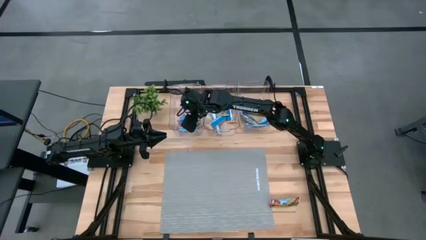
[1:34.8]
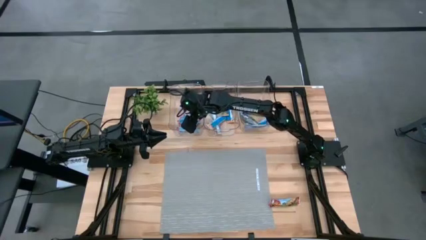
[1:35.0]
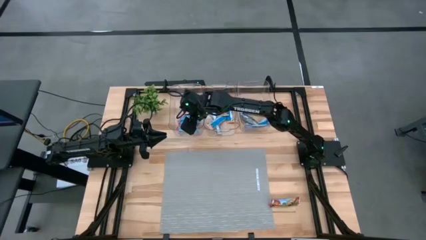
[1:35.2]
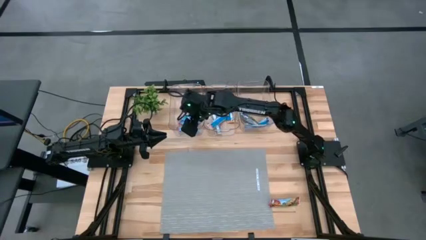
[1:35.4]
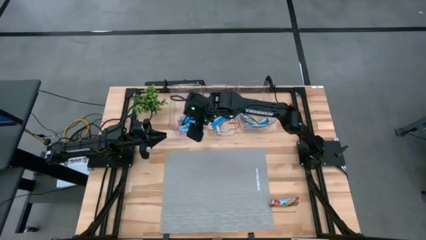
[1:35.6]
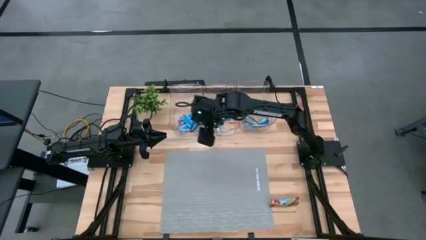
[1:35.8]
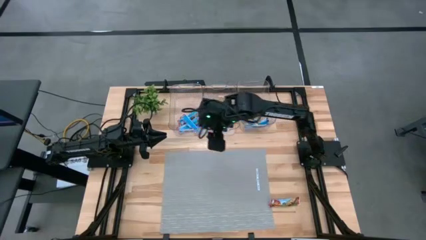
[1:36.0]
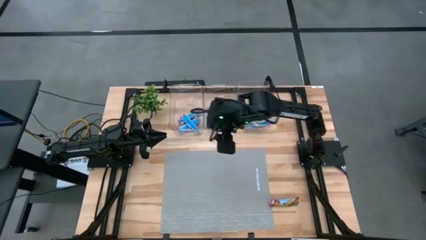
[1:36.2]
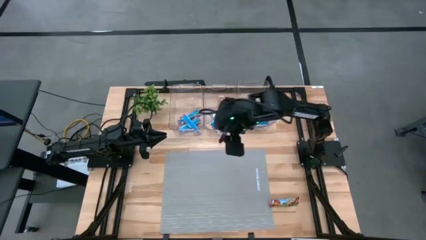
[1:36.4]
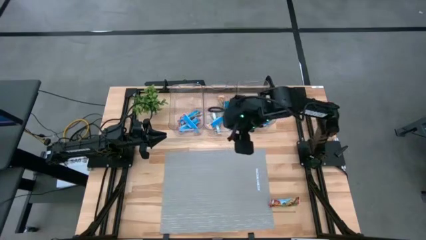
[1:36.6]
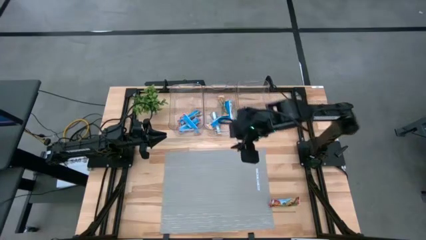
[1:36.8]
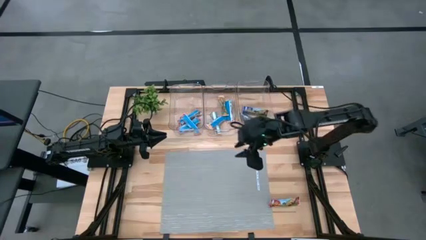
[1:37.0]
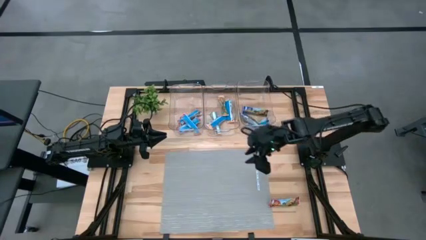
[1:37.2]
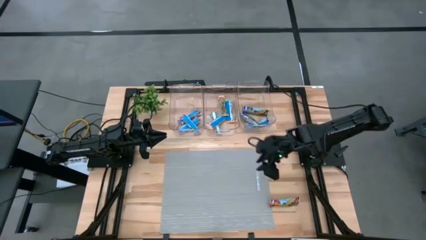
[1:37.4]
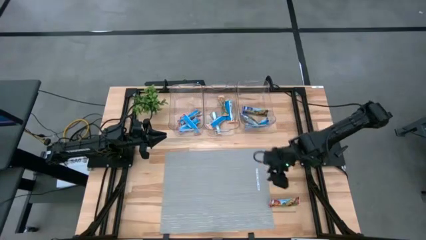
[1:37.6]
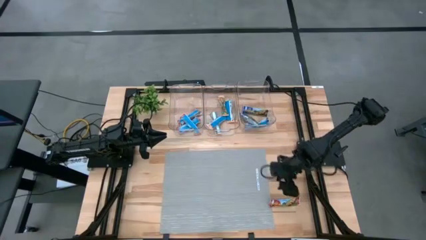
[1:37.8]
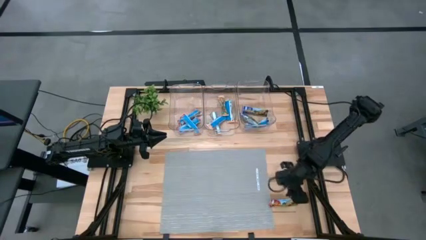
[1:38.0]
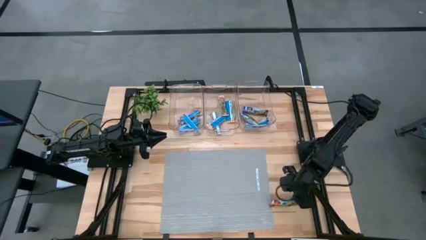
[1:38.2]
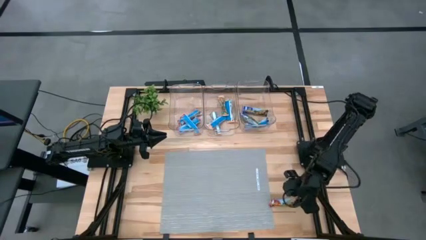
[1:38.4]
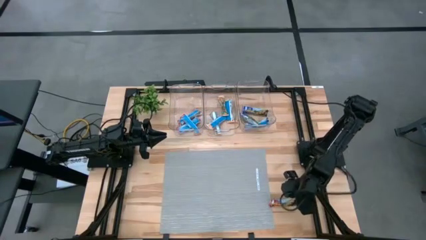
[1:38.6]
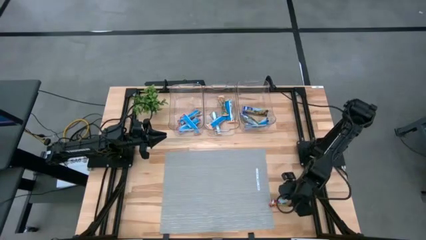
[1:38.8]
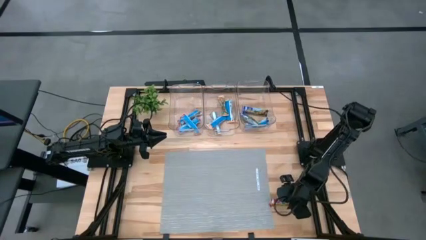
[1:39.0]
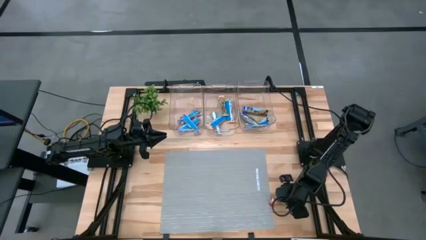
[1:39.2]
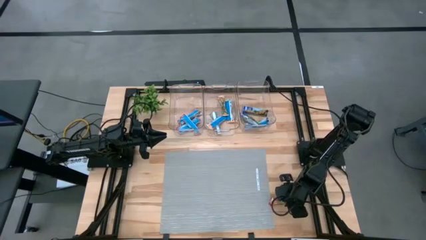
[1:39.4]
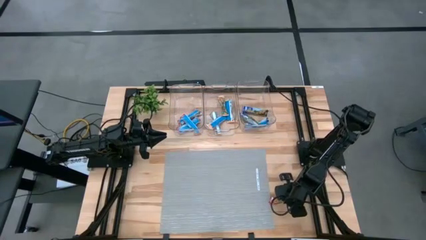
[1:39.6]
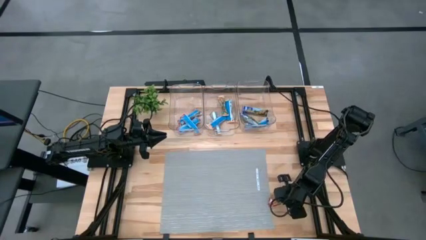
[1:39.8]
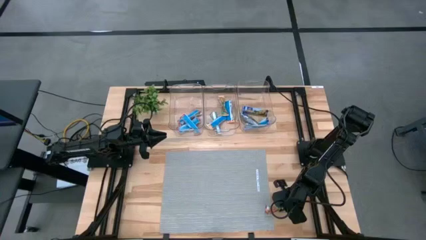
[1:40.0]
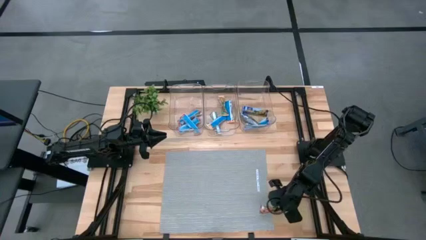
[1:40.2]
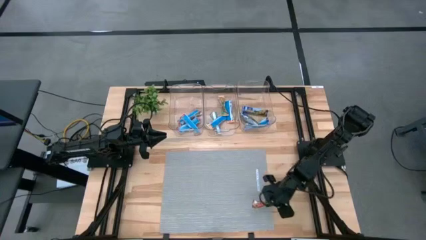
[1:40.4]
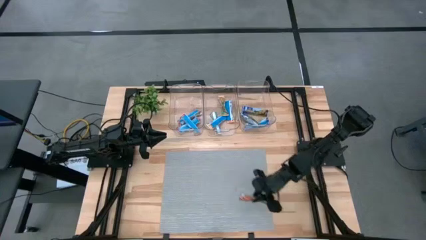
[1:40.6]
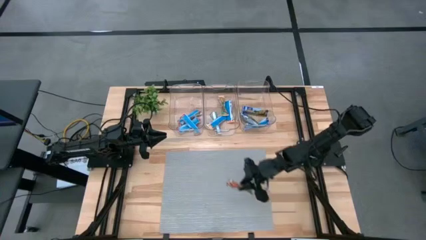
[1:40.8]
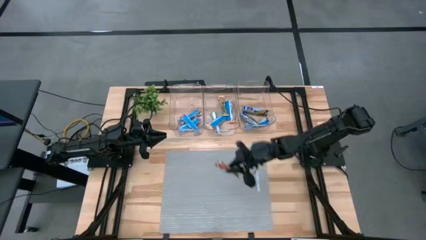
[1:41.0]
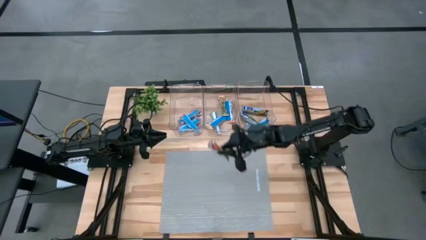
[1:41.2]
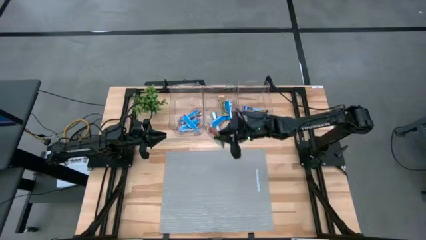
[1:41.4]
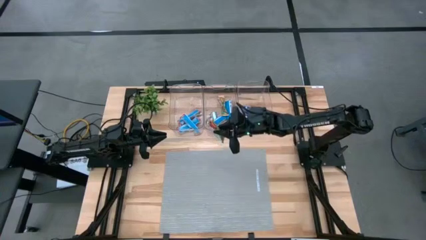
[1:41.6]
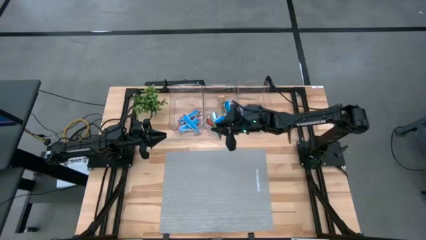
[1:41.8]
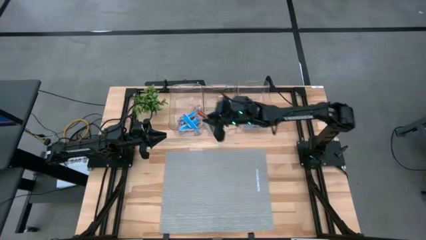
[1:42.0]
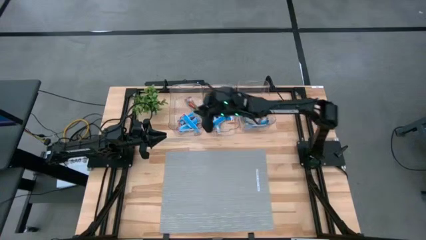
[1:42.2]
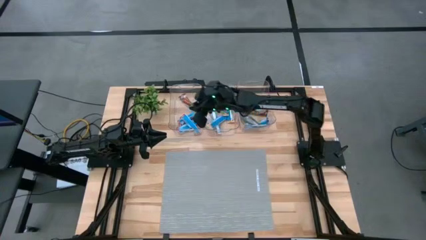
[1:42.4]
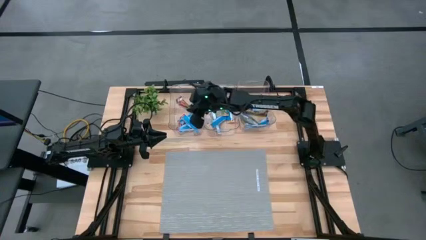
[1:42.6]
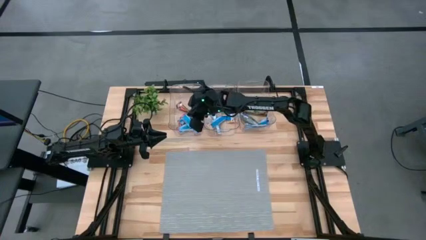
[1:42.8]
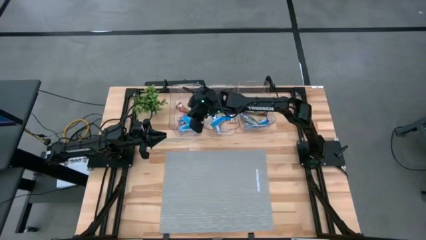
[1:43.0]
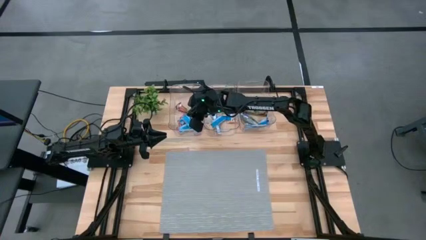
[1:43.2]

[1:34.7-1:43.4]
Task: Pick and place Granola Bars by type
Put the red granola bar into the left transparent bin

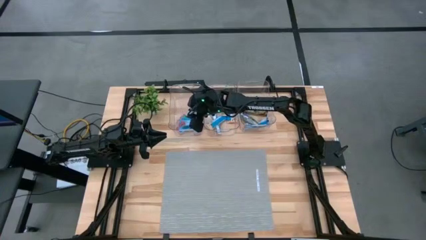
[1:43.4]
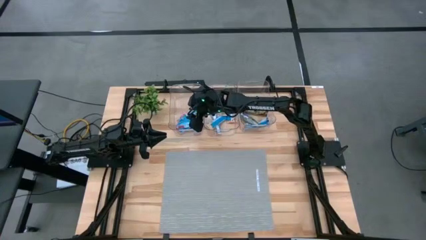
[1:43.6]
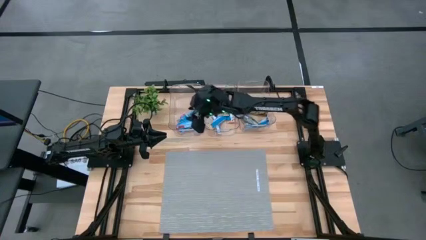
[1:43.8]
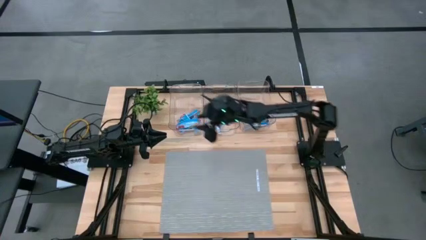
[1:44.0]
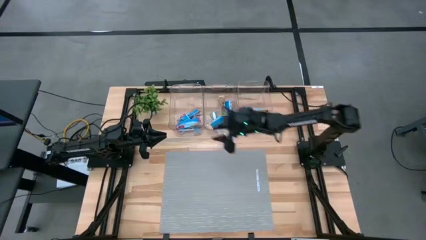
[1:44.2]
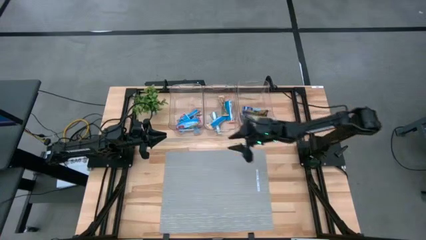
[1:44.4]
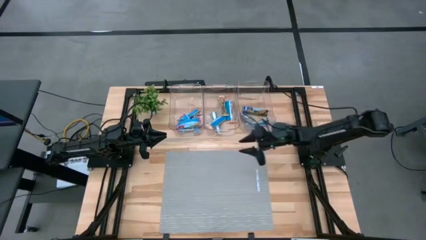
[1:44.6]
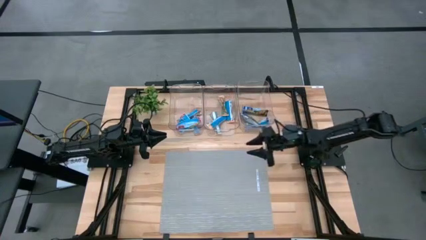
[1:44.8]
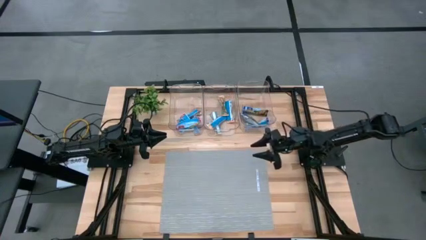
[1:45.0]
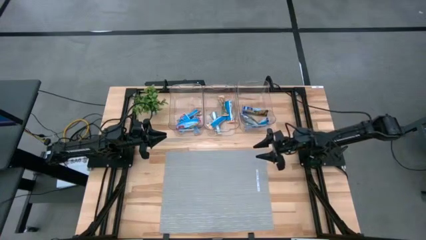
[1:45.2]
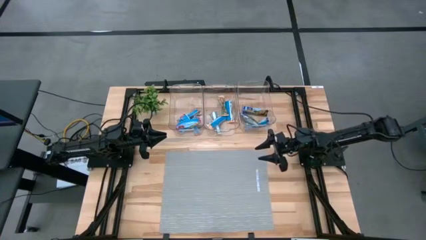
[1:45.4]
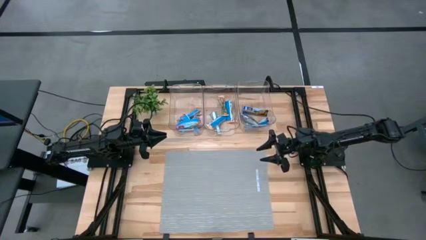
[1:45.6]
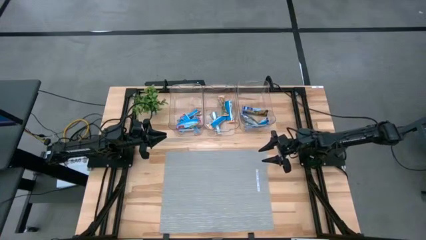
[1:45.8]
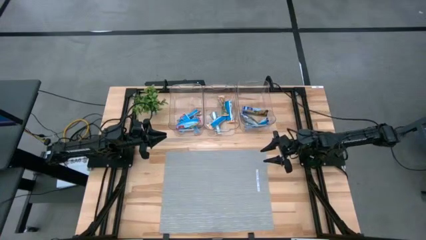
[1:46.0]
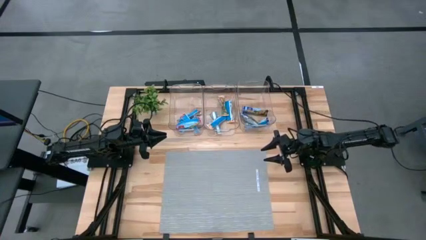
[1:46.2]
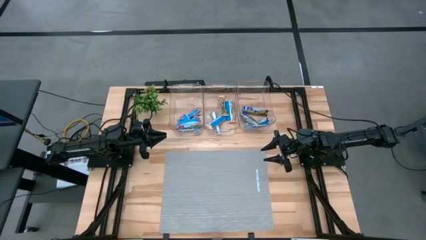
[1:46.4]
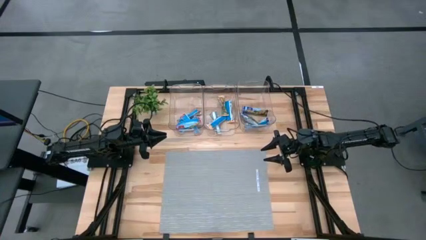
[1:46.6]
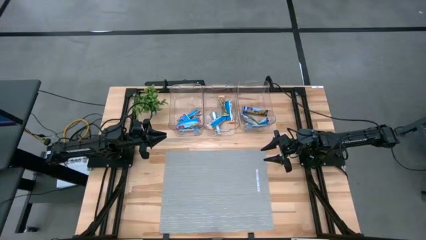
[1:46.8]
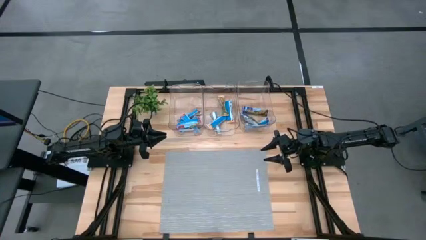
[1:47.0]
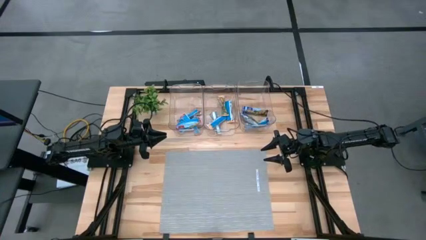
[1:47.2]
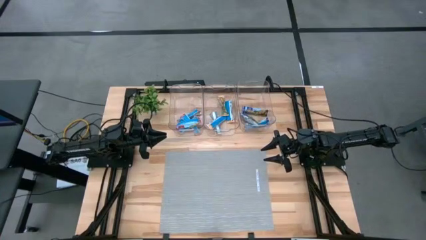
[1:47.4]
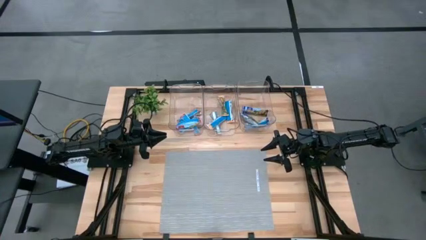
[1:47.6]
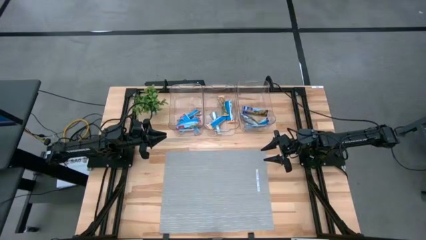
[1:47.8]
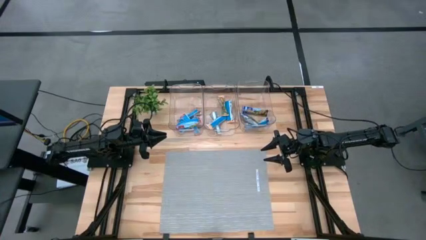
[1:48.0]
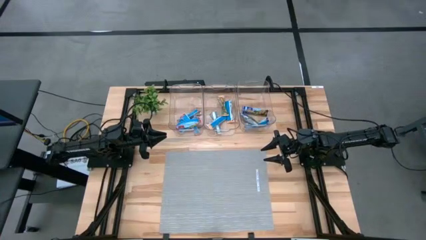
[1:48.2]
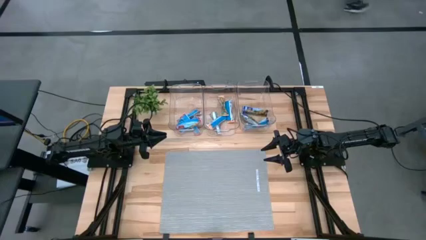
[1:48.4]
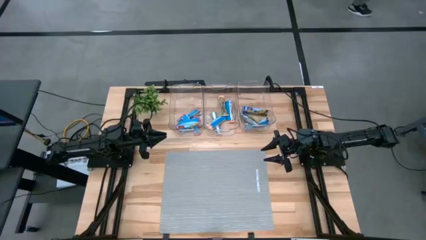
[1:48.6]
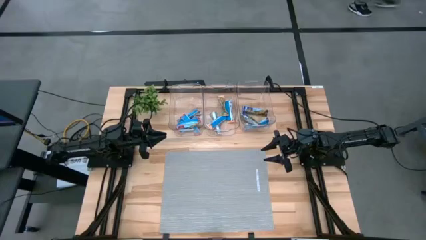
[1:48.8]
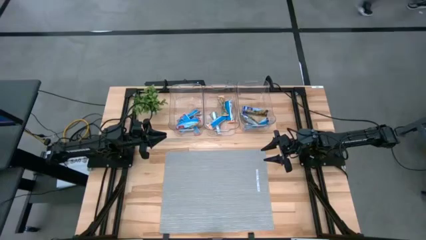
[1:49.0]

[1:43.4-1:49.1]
Return to Home Position

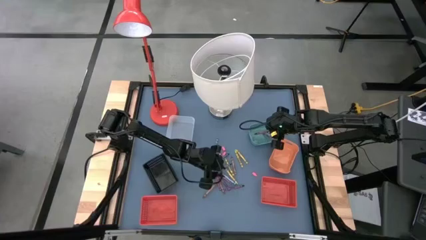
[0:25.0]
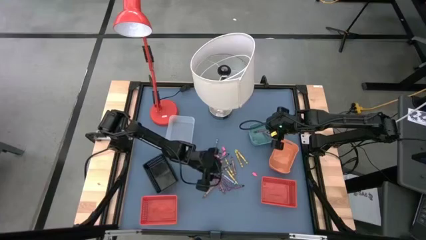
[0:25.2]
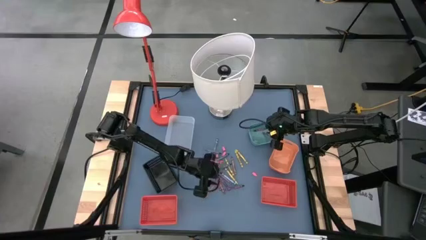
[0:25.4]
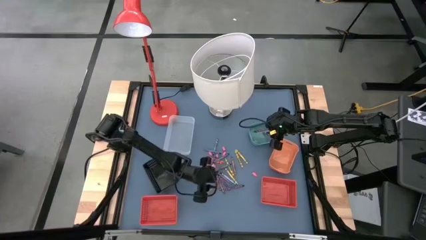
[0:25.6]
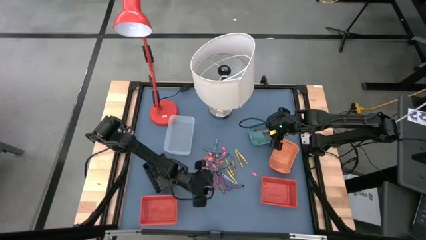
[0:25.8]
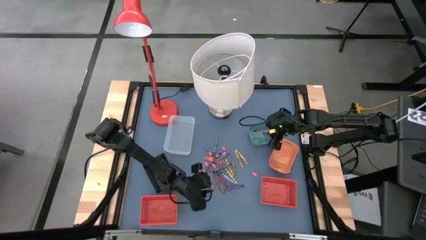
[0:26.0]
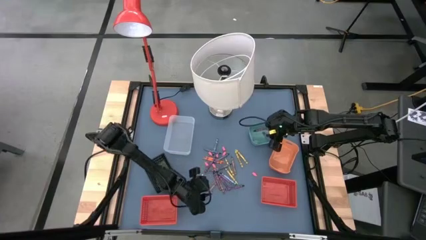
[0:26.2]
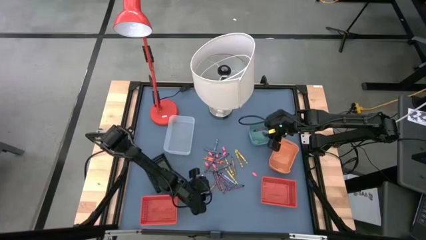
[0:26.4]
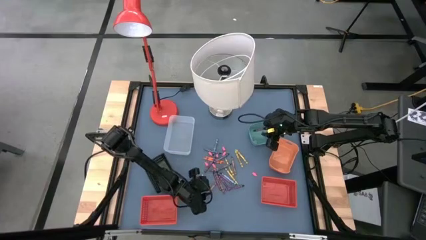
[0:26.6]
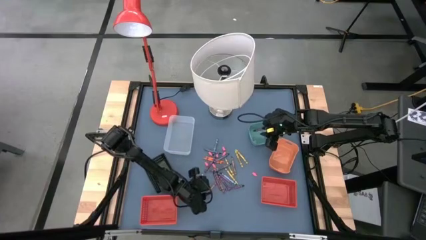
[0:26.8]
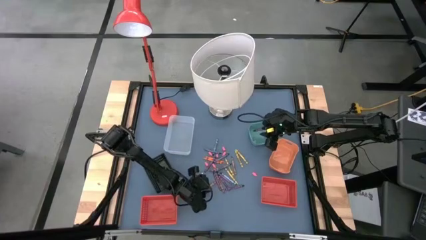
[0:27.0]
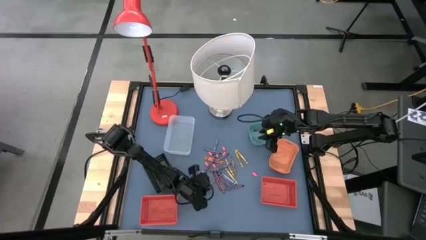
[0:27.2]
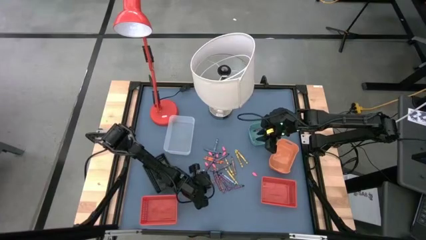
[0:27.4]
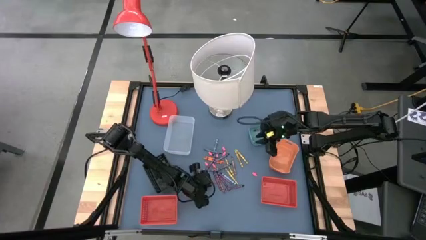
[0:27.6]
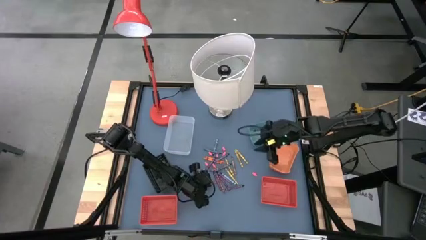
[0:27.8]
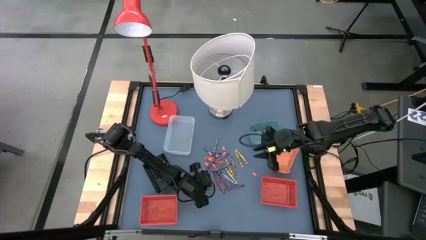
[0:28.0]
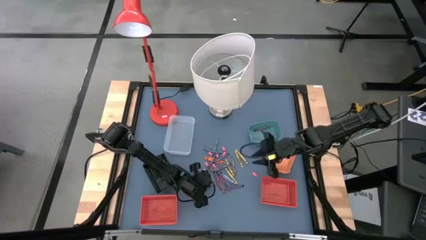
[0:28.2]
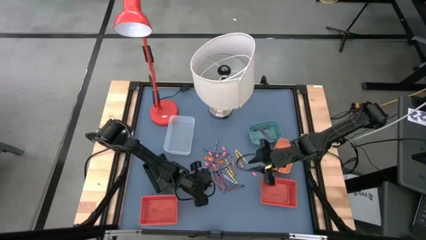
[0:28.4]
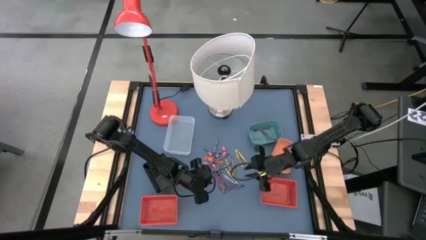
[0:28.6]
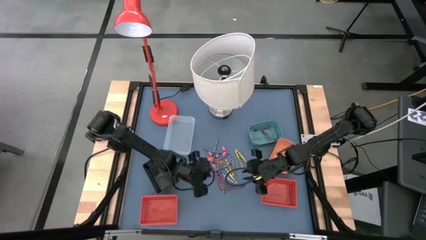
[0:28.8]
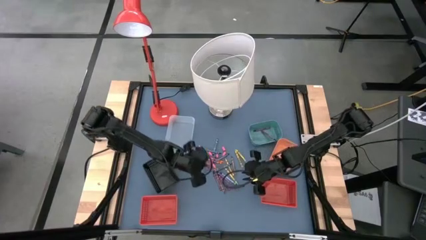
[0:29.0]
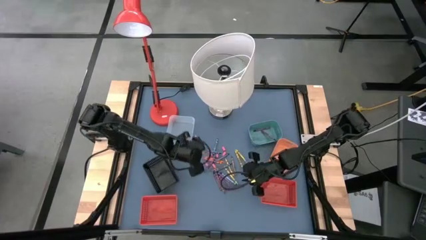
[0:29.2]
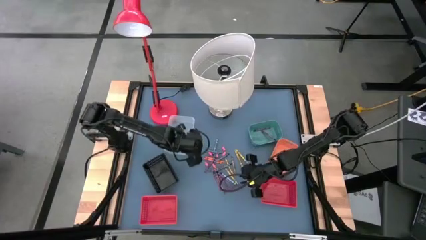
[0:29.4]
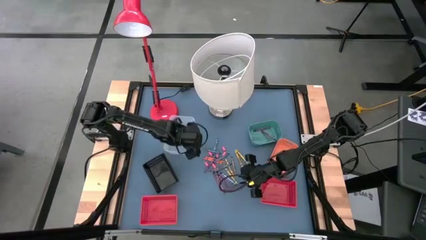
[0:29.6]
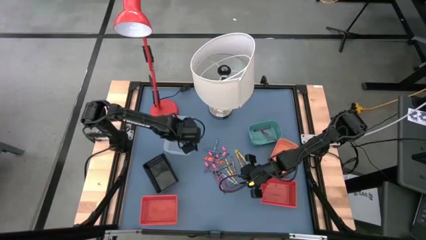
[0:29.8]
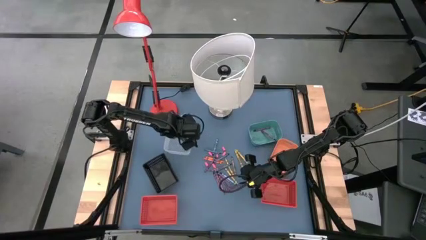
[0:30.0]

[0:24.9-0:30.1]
Task: Sort crayons
Put the brown crayon into the transparent bin
